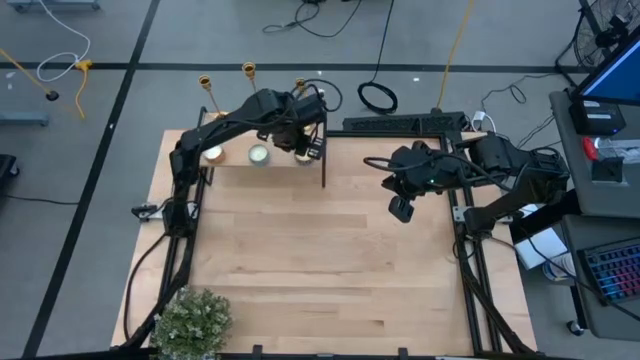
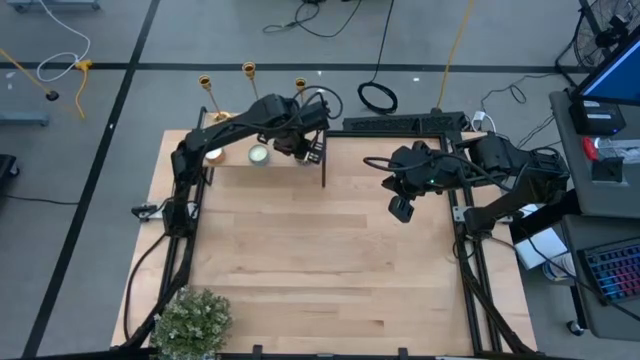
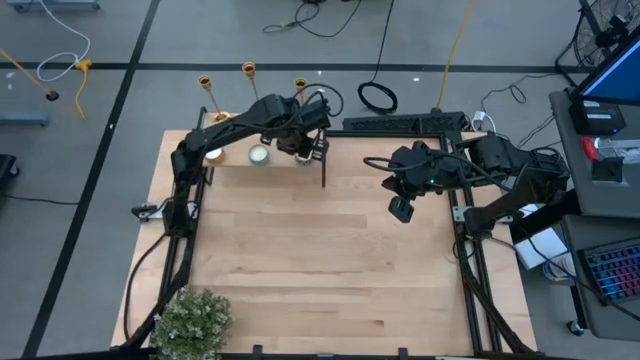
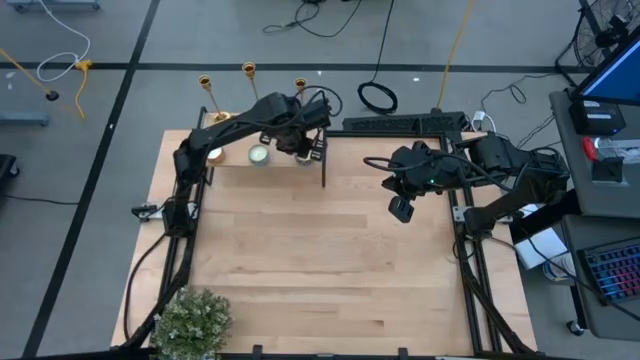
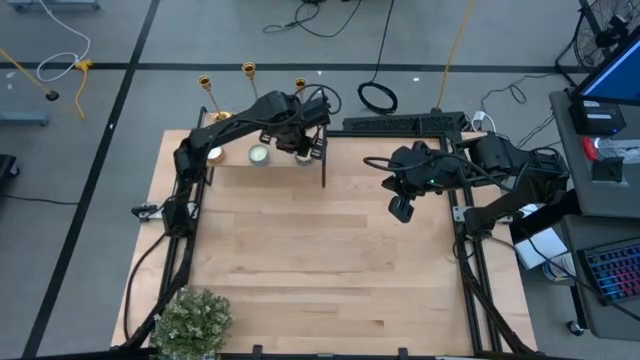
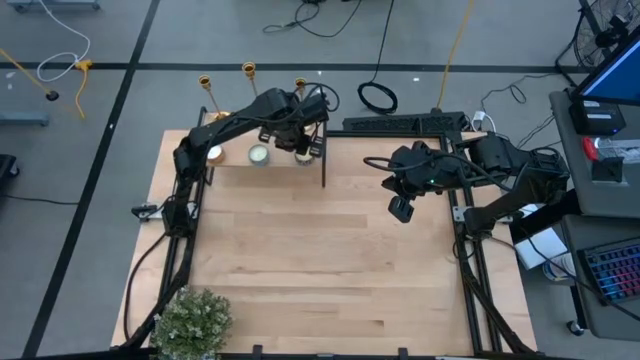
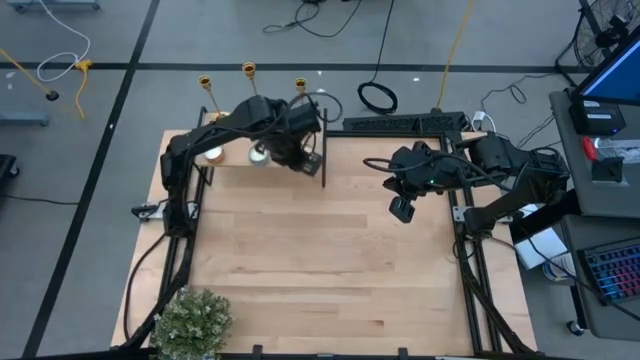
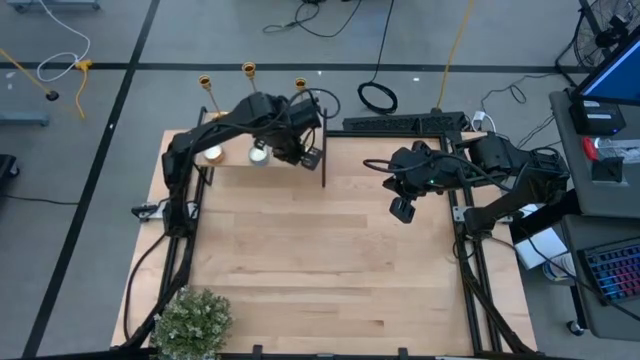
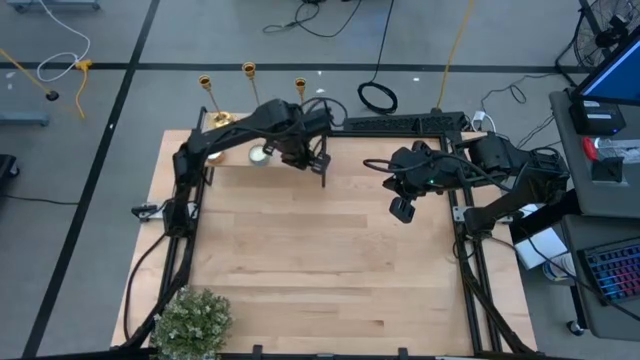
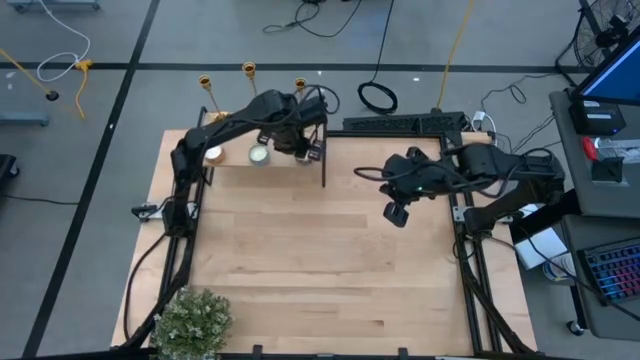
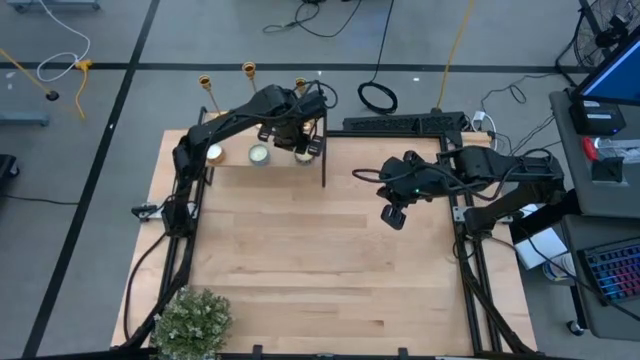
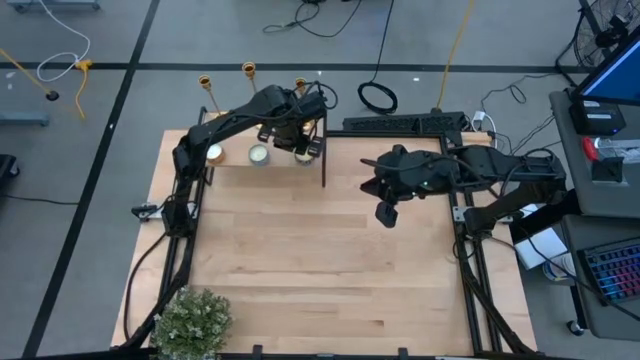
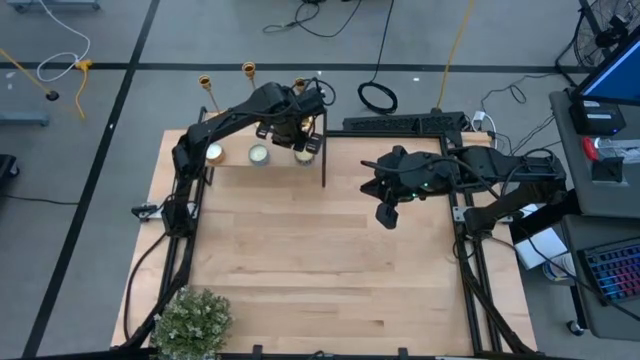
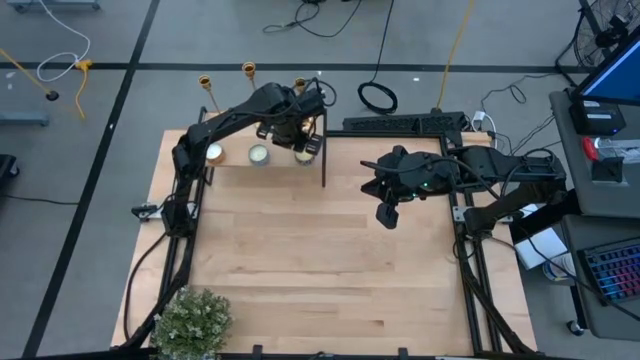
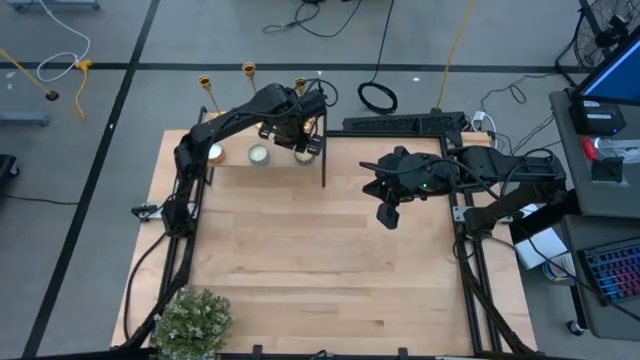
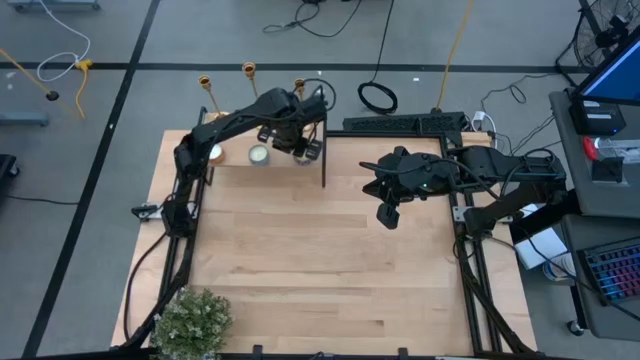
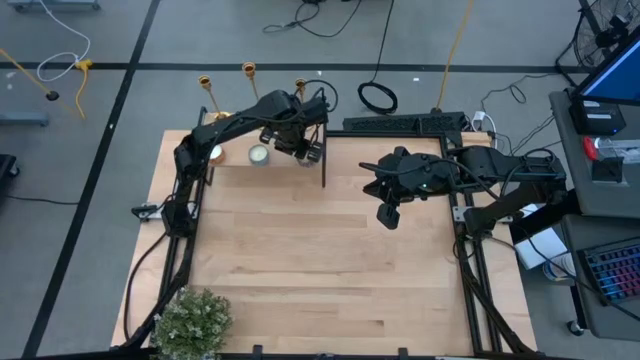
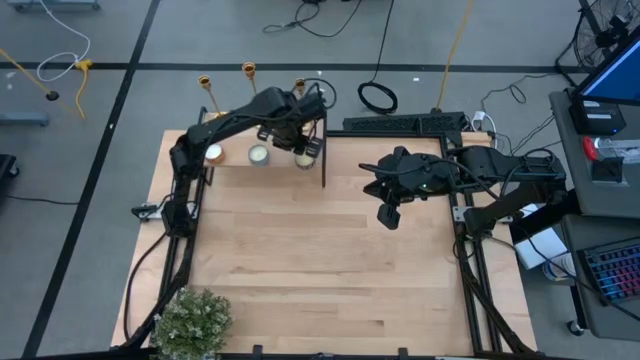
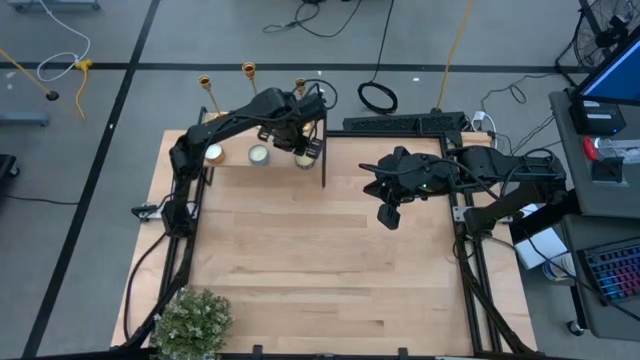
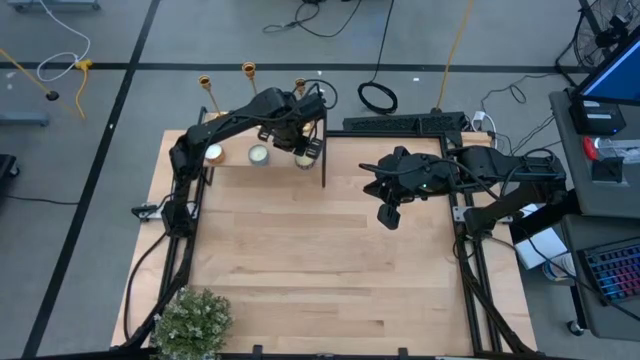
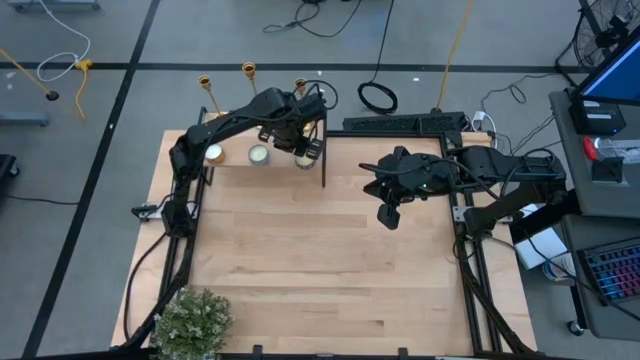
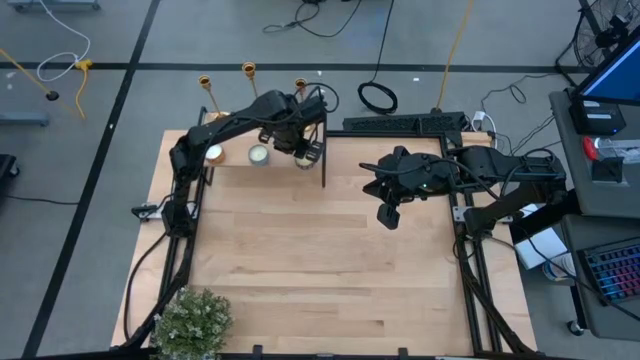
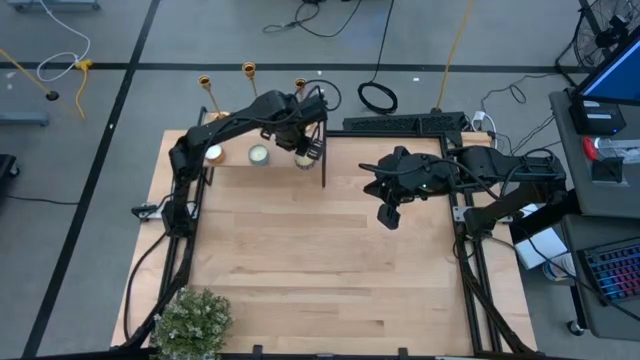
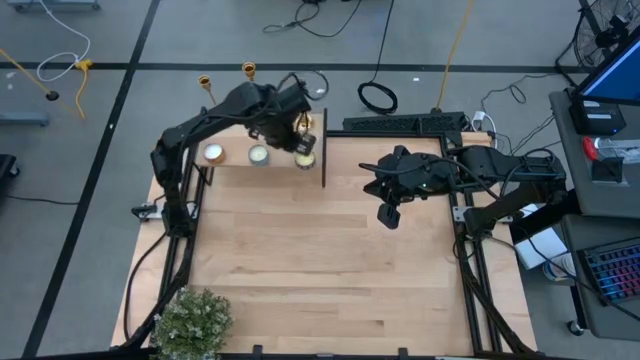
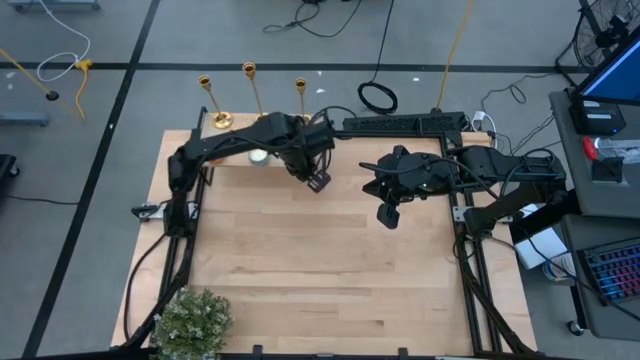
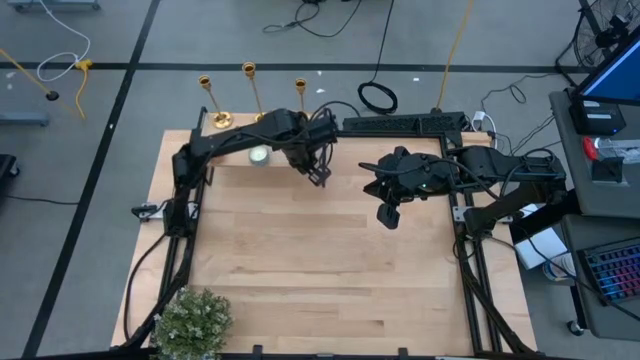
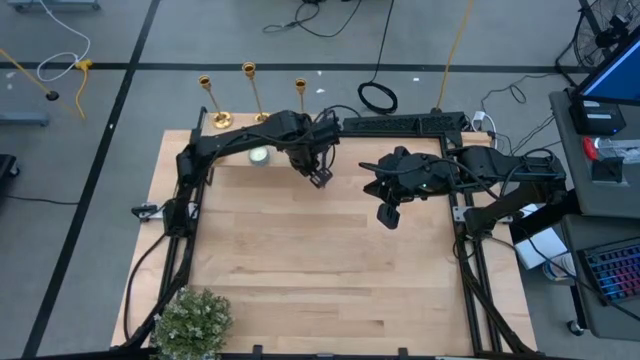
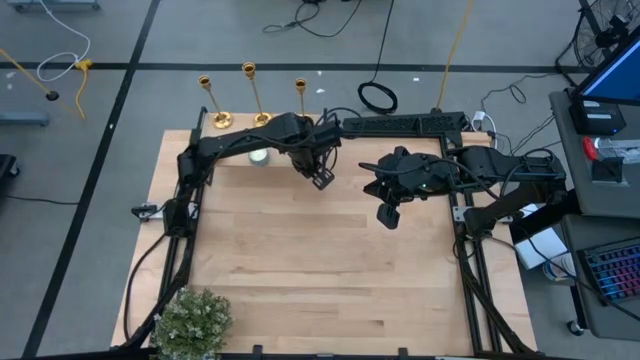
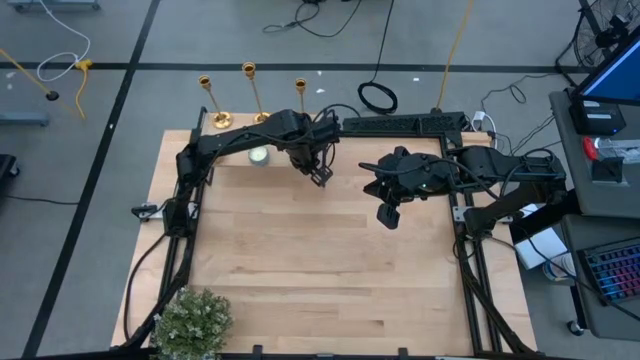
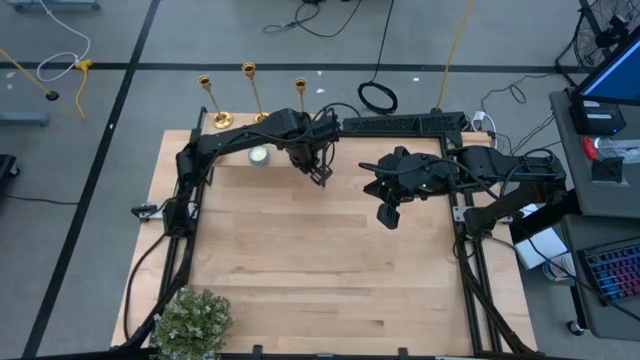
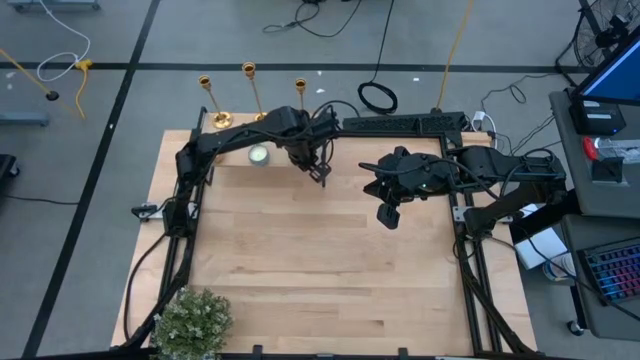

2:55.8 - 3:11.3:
Task: Pick & Place candle stick holders
Put the white scented candle on the shelf
